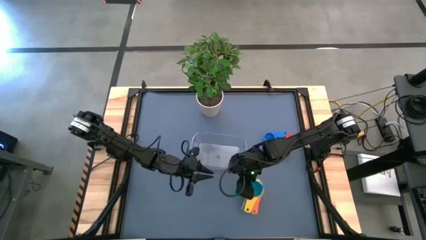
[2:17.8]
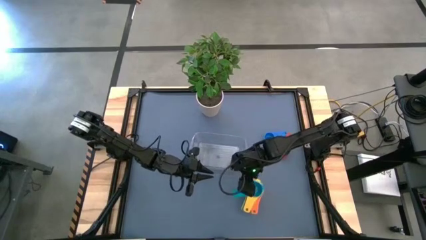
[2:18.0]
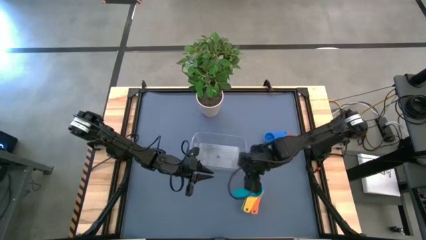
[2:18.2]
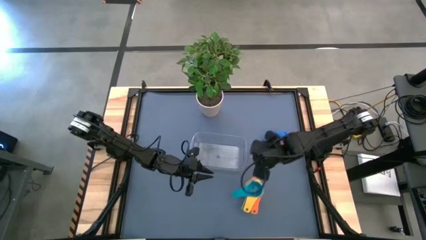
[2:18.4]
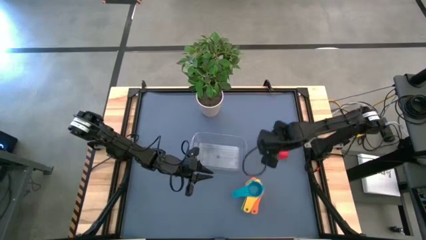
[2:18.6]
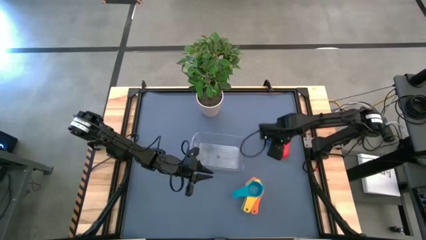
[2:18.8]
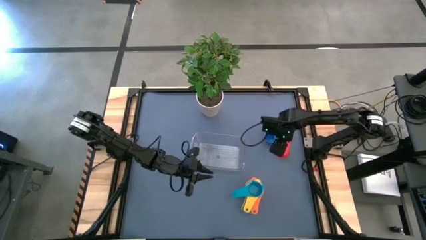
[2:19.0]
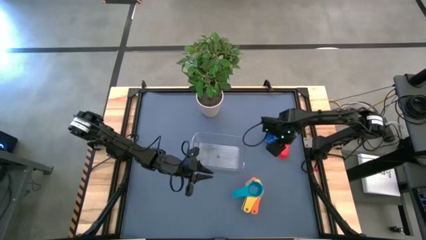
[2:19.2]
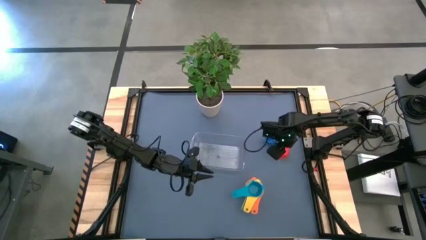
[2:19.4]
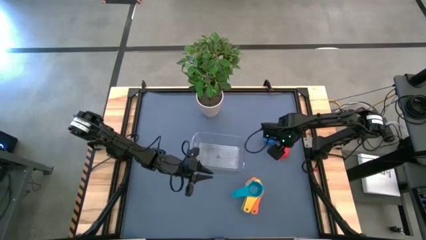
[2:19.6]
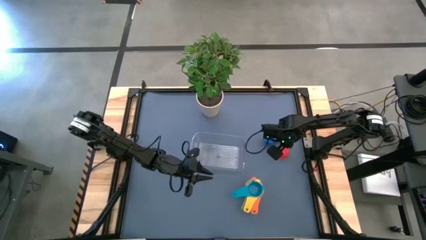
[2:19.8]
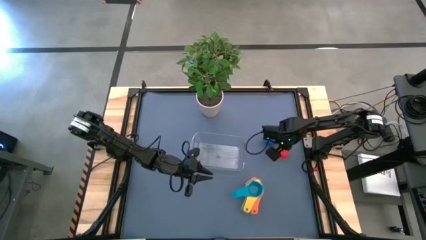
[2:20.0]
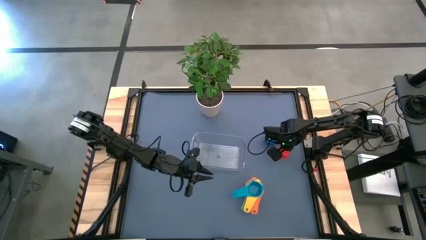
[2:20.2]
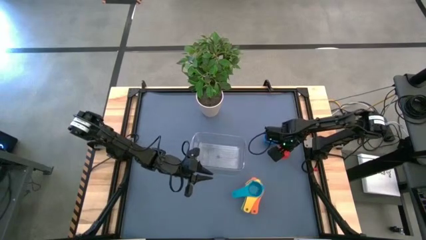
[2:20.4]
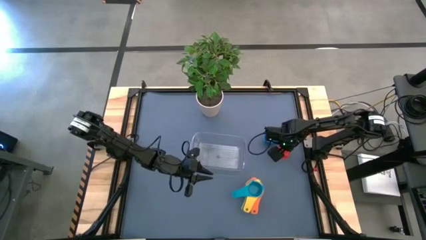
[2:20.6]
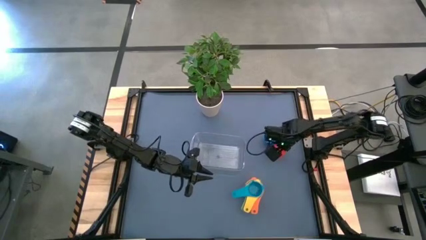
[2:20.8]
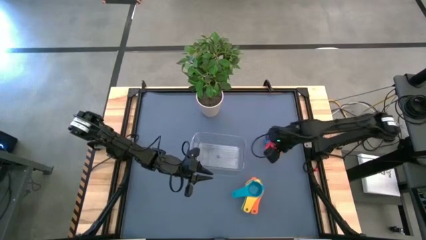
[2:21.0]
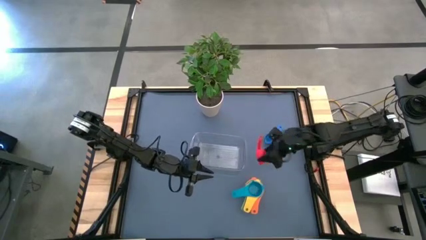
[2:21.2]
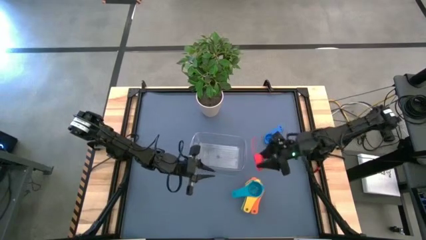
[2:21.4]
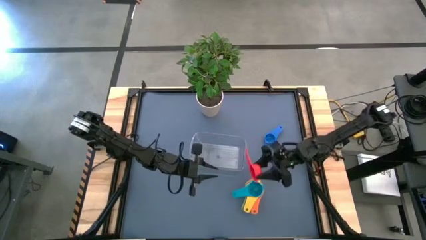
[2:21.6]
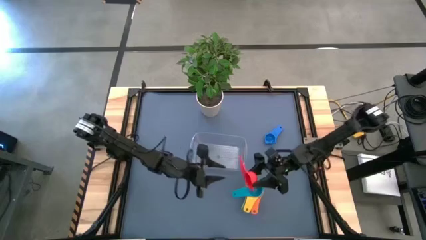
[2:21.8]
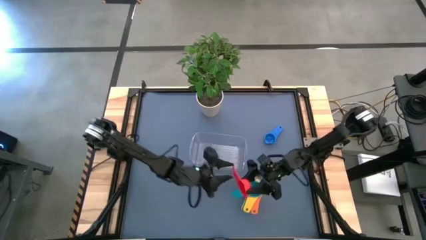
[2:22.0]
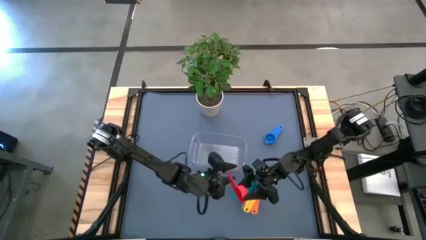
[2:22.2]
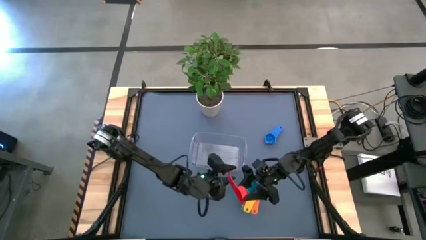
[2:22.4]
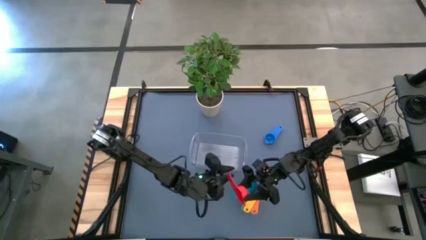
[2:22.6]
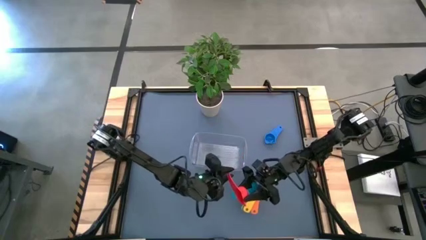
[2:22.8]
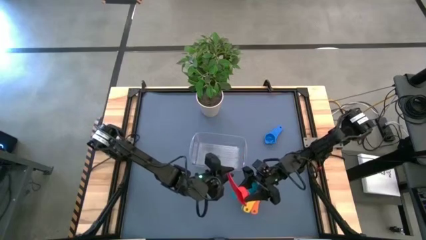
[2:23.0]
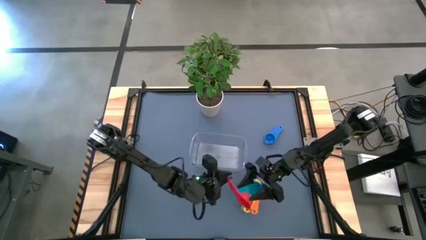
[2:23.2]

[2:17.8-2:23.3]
Task: Nest measuring cups in basket
Stack the red measuring cup on top of the light blue measuring cup

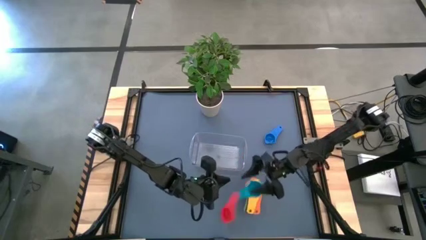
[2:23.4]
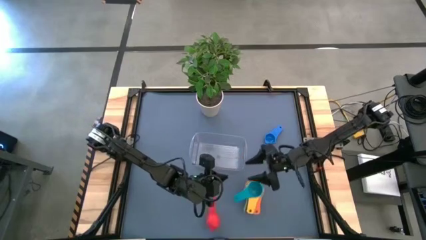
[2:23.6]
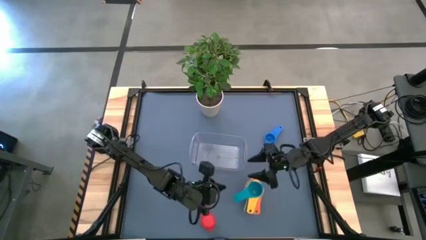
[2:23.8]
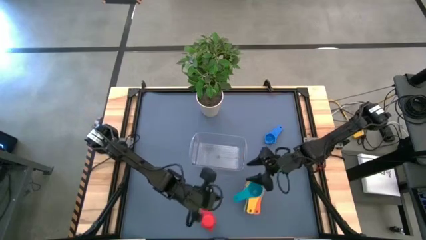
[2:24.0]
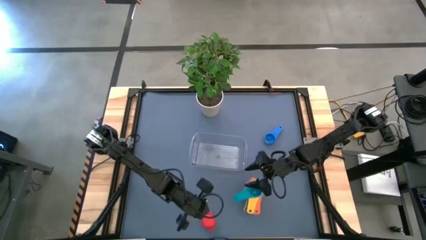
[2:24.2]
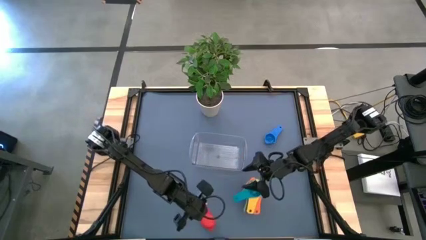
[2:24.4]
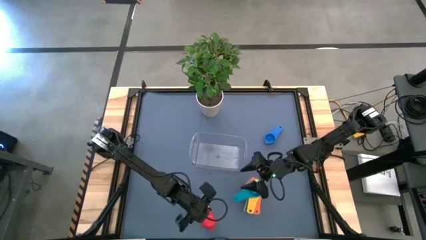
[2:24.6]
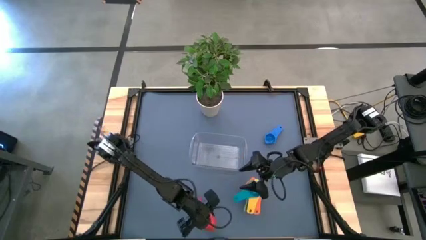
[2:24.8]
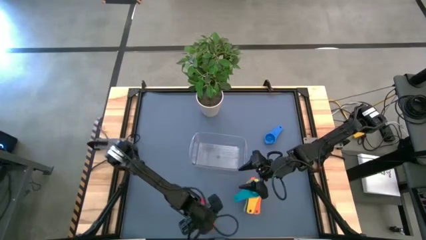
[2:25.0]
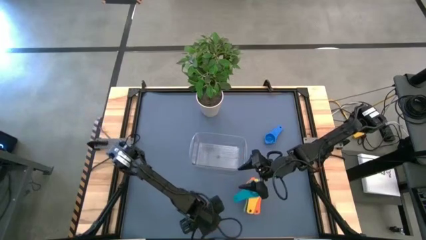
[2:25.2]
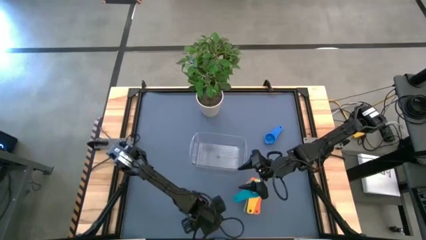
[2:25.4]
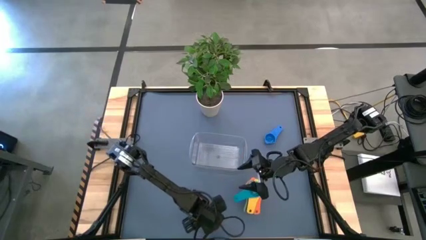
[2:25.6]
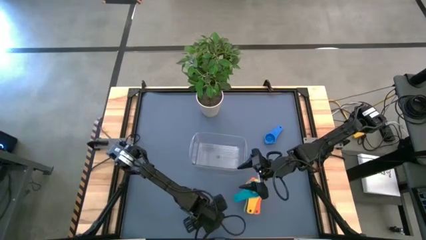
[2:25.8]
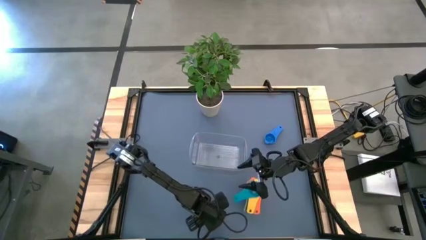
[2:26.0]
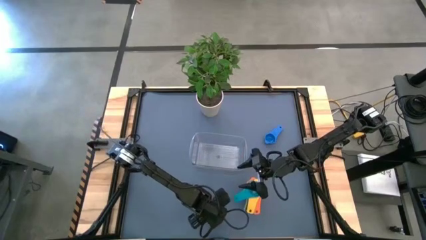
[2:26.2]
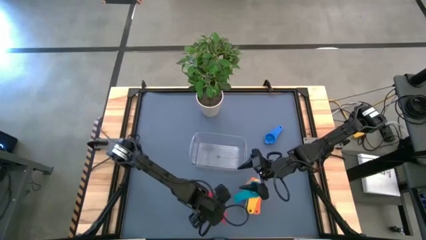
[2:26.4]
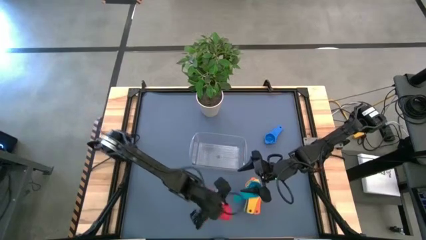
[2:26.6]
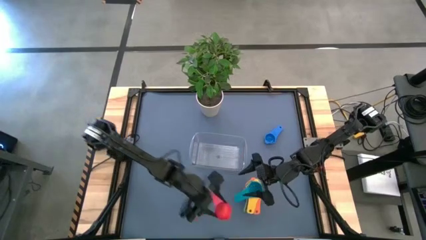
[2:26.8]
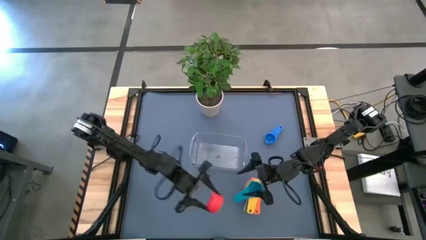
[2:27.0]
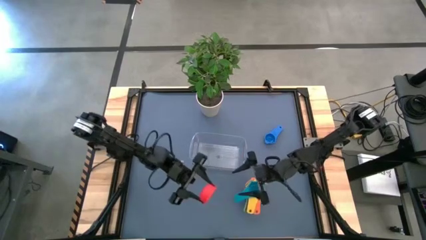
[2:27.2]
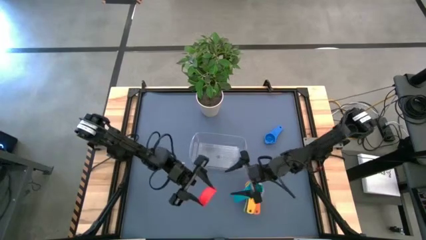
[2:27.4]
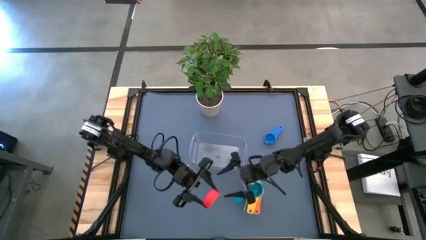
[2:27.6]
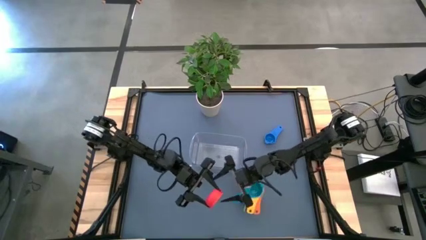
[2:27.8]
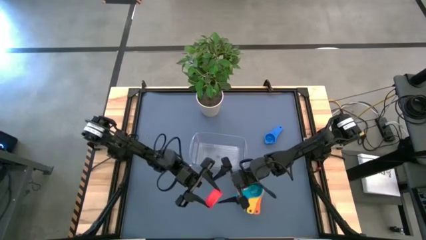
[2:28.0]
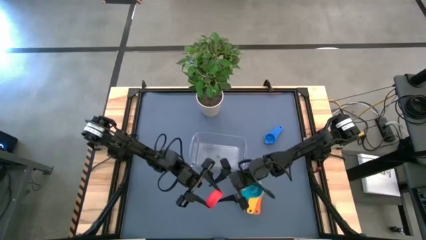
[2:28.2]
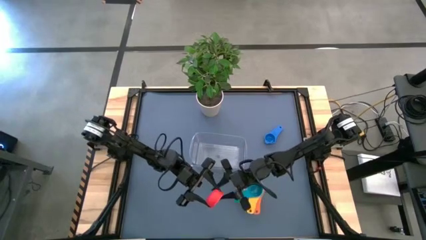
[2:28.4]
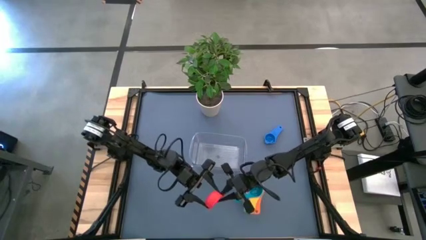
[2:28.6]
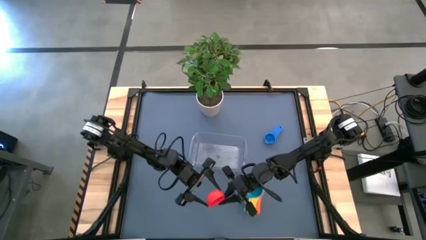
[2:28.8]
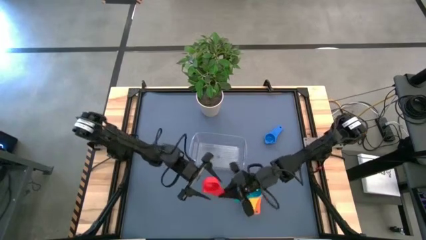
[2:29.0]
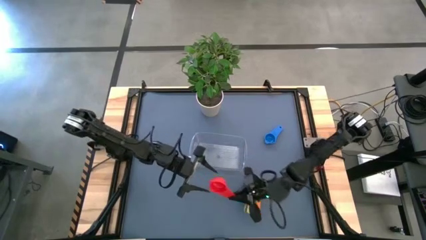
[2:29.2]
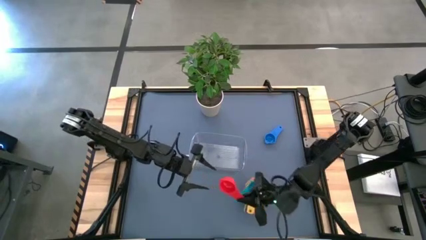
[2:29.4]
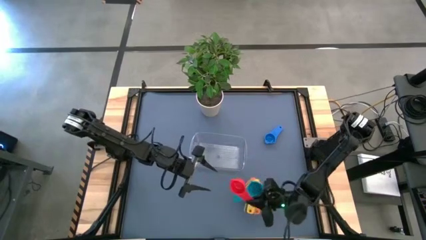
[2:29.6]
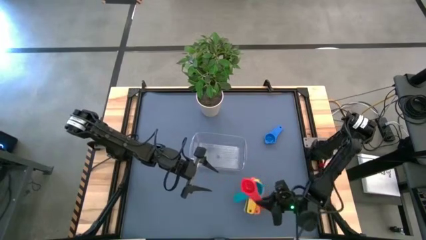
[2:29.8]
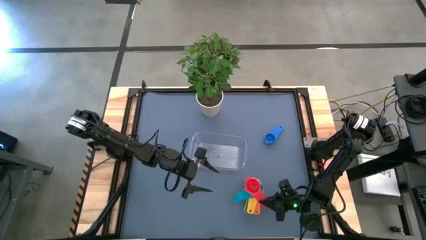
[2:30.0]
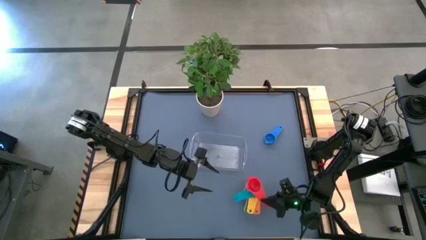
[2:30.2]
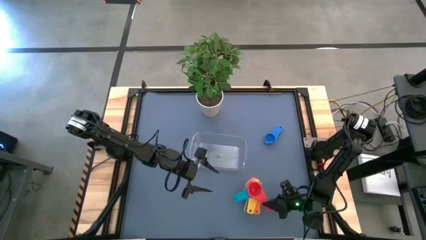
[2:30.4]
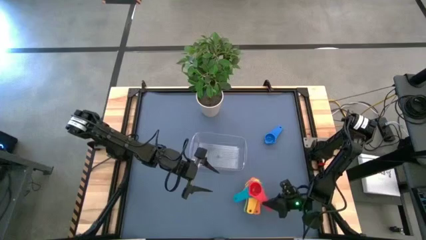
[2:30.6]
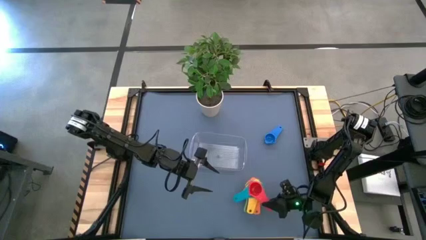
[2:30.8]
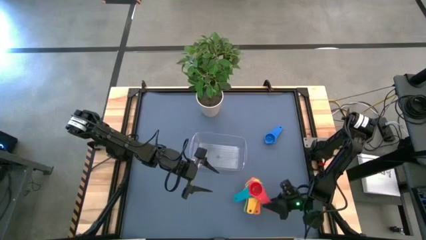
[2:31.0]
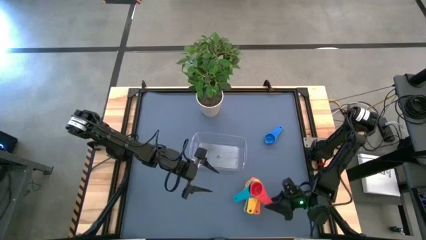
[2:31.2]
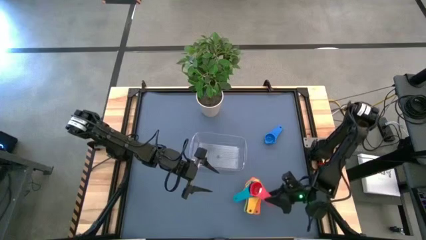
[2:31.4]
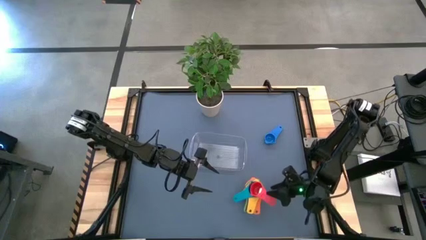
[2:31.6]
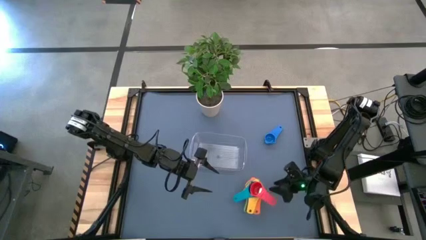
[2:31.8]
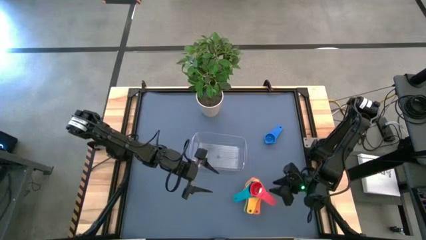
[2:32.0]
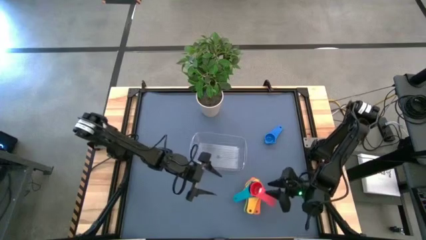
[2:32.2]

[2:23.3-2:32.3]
Stack the red measuring cup on top of the light blue measuring cup

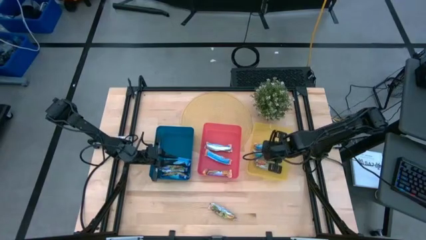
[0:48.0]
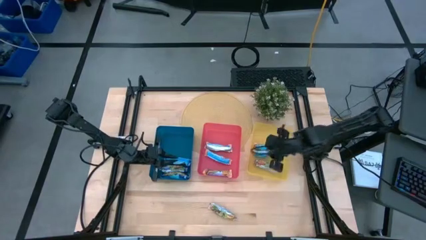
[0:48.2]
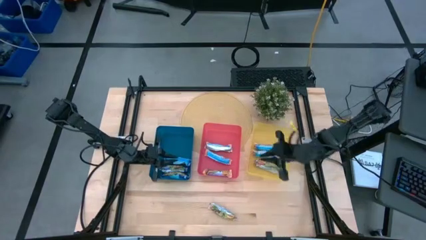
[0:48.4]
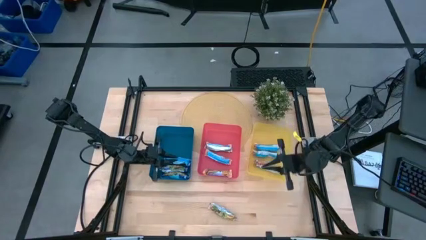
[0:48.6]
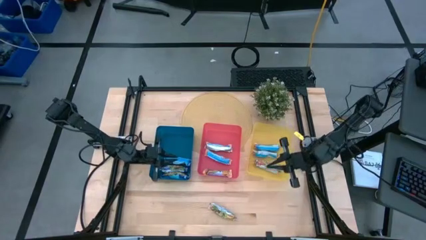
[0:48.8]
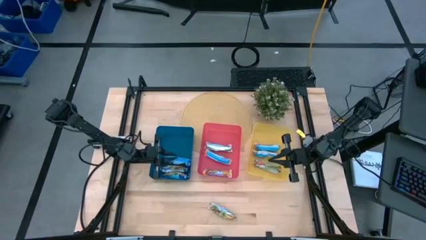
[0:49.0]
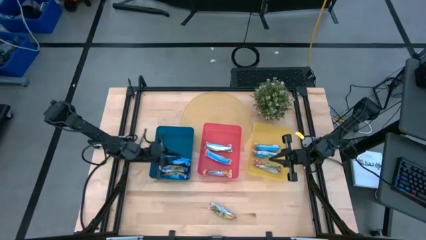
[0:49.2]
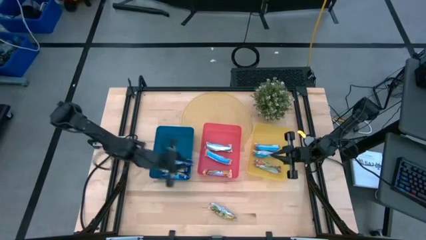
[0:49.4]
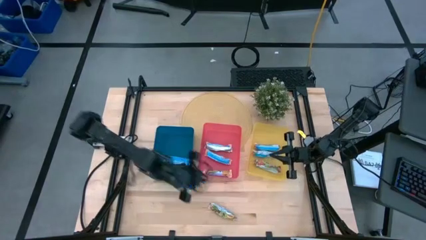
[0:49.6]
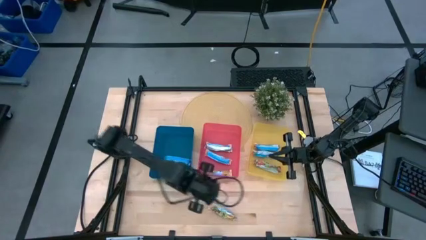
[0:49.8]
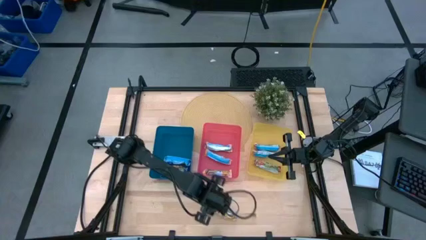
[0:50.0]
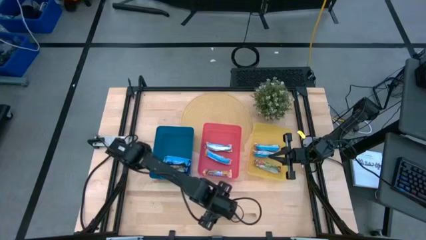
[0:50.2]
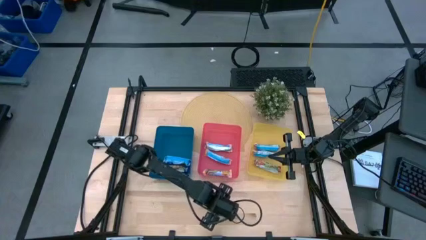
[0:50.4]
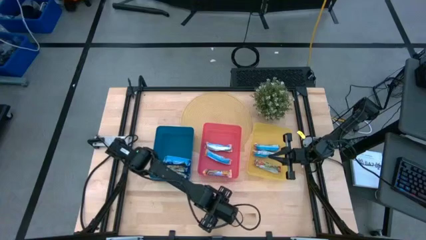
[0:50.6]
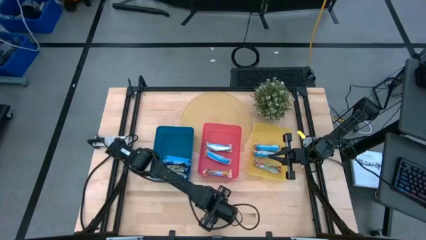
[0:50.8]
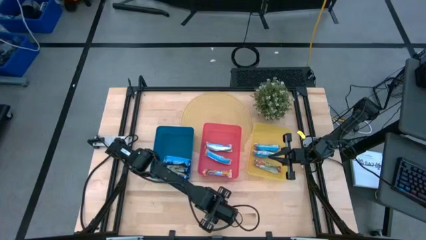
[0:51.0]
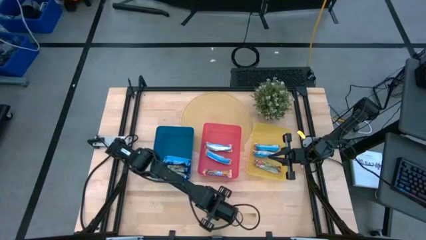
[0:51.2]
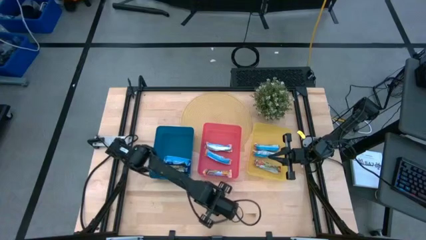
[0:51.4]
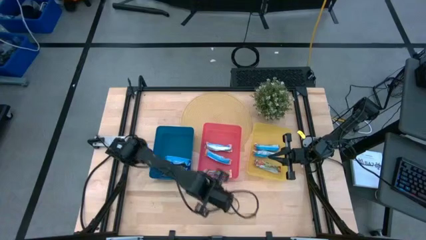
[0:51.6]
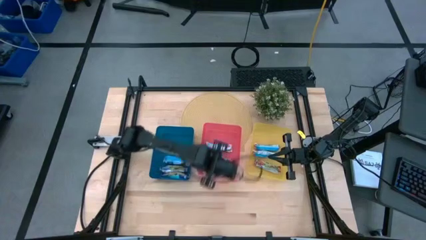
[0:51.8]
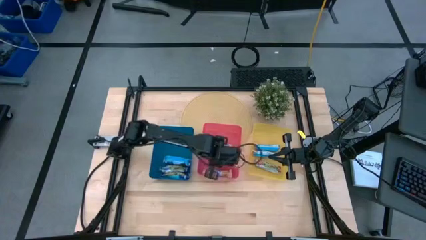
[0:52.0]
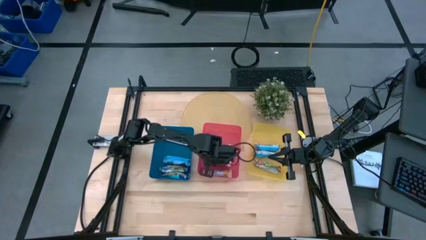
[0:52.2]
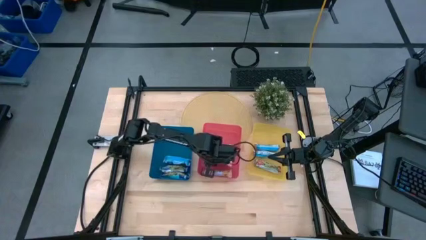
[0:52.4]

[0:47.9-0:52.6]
Task: Pick and place Granola Bars by type
Put the orange granola bar into the red bin
